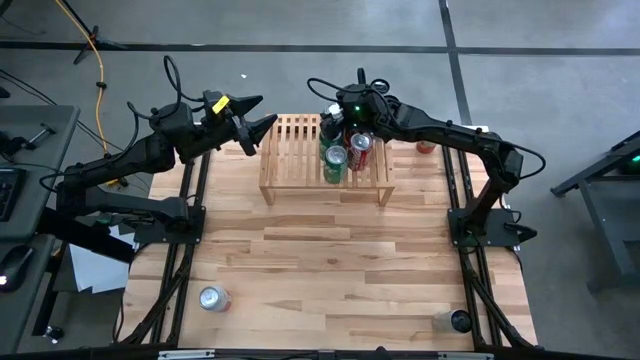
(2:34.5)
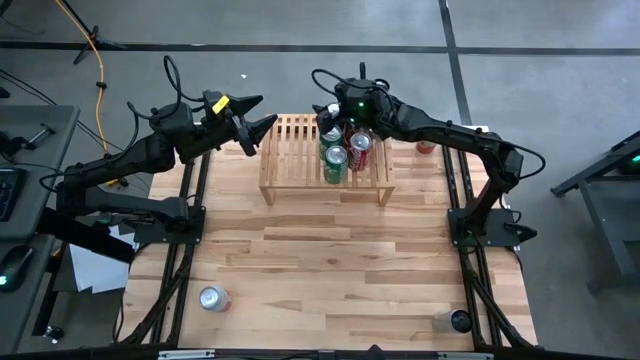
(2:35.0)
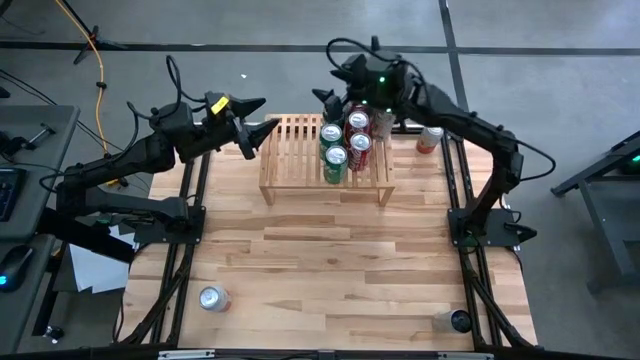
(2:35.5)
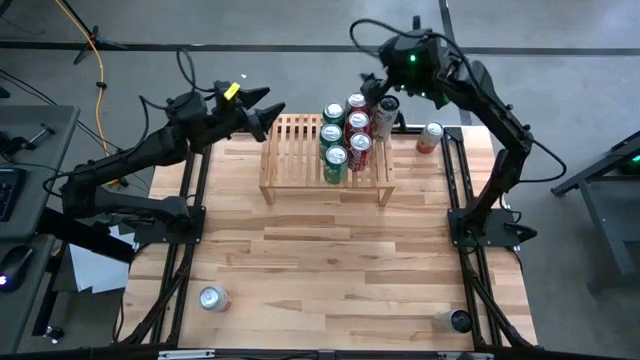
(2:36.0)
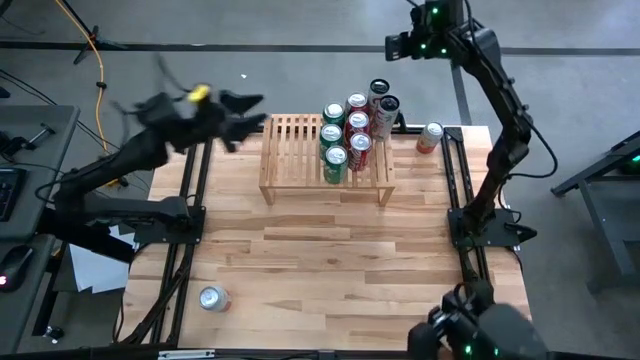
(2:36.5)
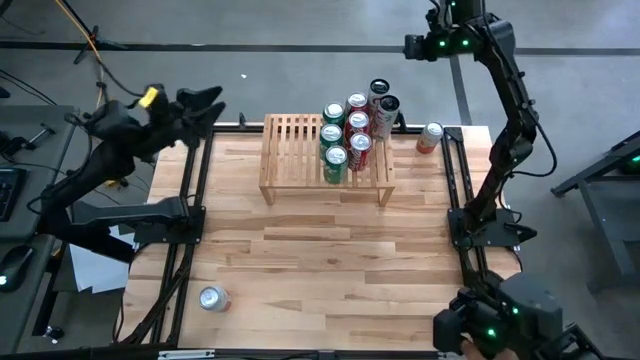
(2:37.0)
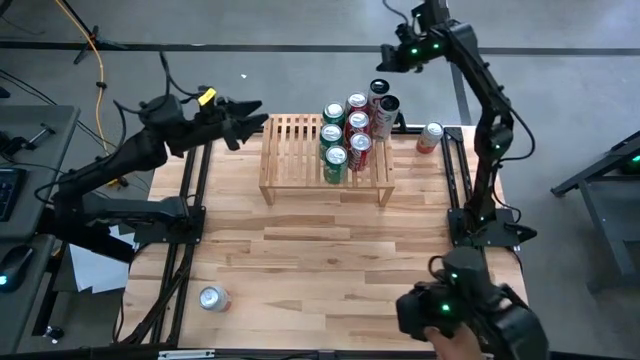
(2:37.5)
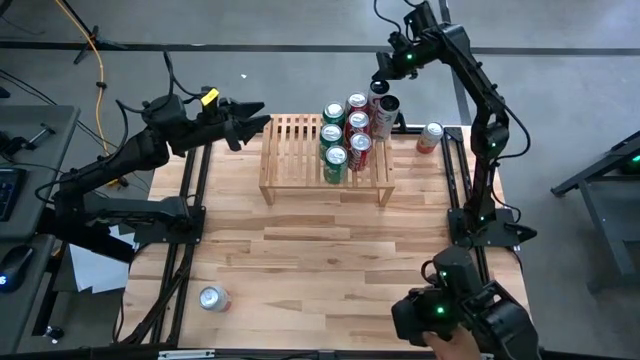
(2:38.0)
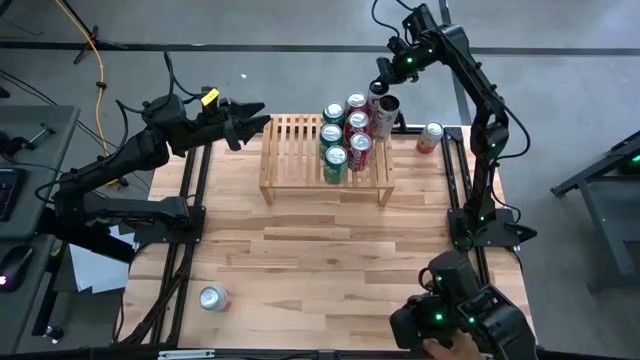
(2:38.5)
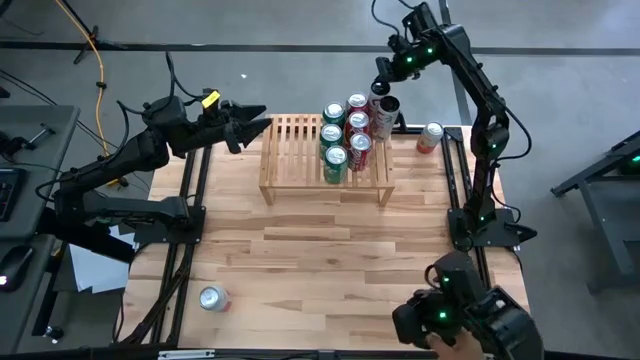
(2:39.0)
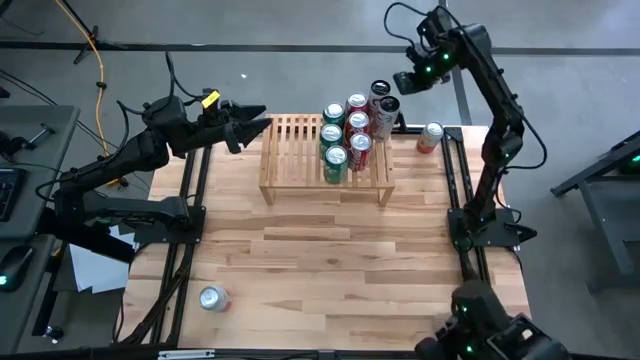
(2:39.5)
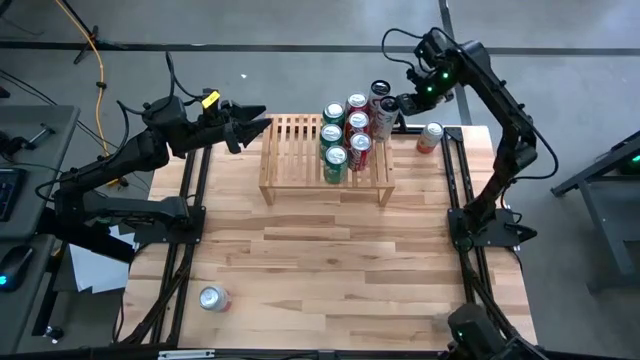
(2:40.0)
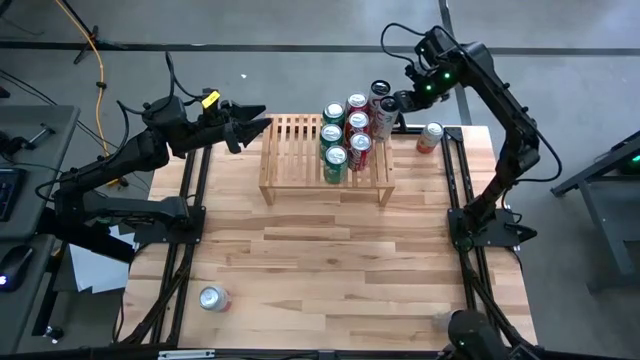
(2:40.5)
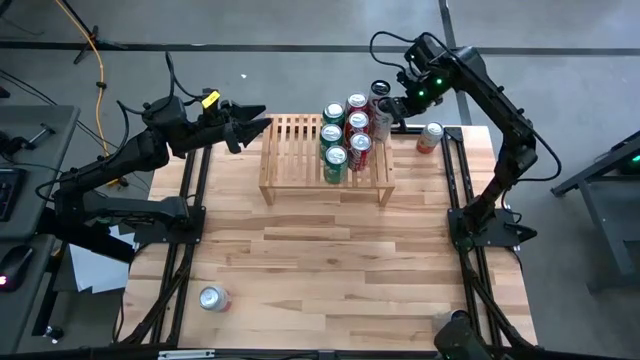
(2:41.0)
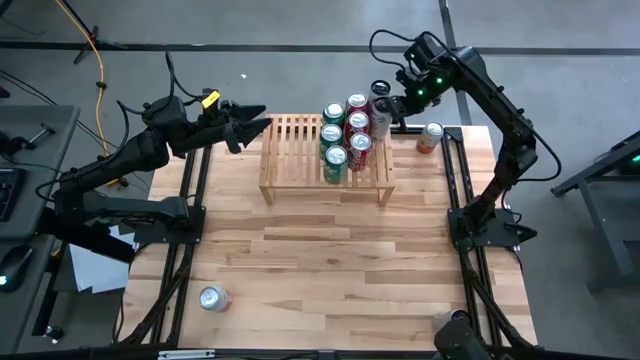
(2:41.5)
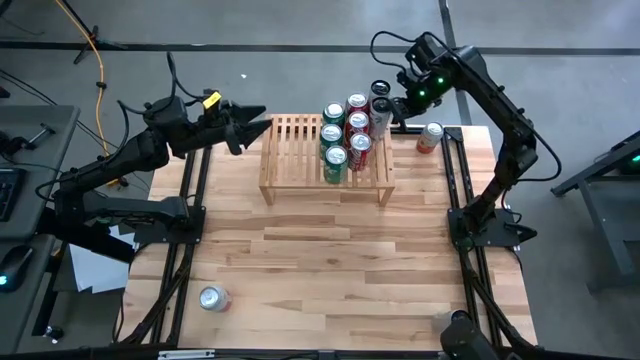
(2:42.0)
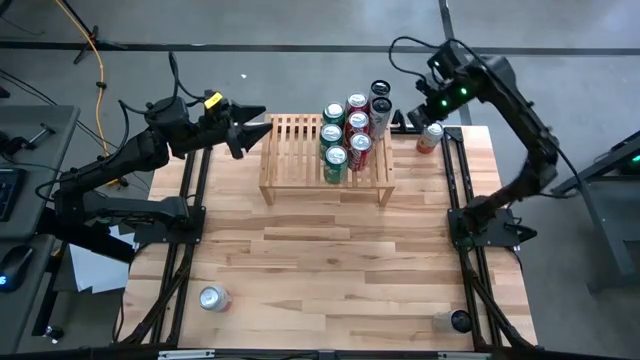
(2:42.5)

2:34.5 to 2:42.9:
Task: Place canned beverage on shelf
Adjust the white pink soda cans on the shelf

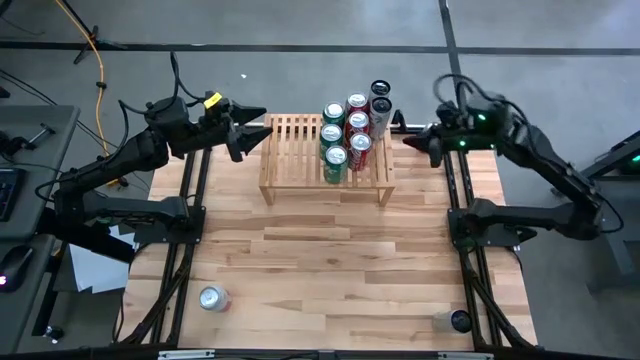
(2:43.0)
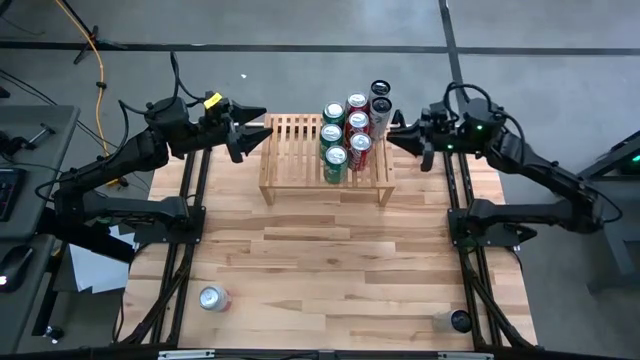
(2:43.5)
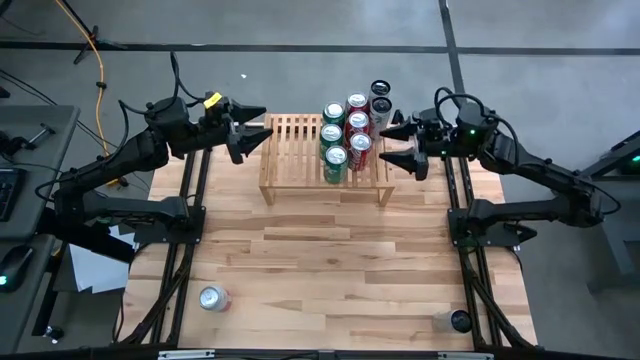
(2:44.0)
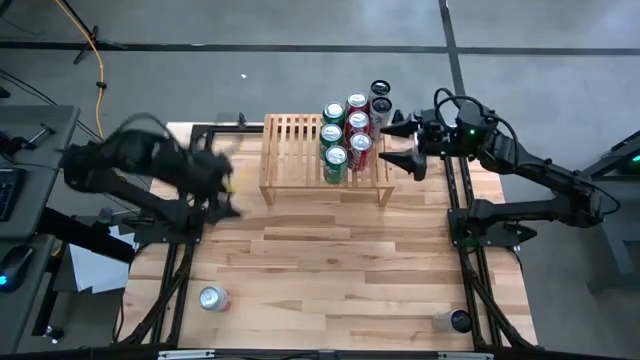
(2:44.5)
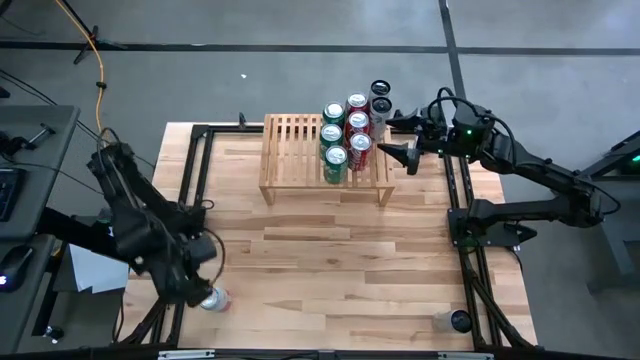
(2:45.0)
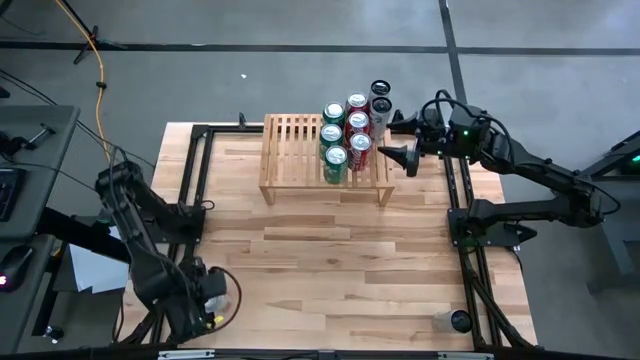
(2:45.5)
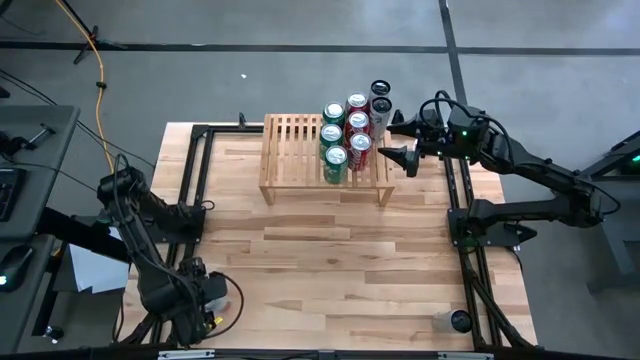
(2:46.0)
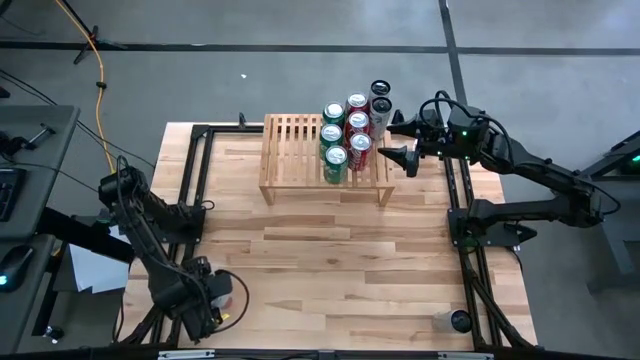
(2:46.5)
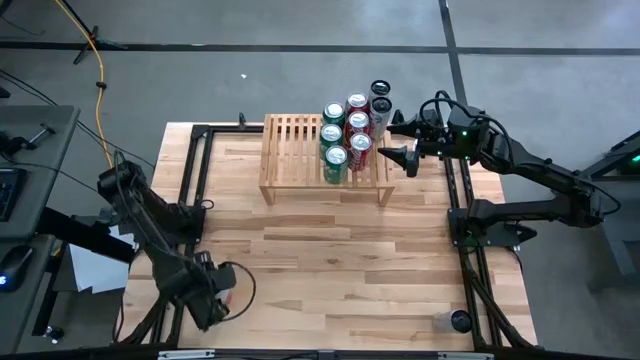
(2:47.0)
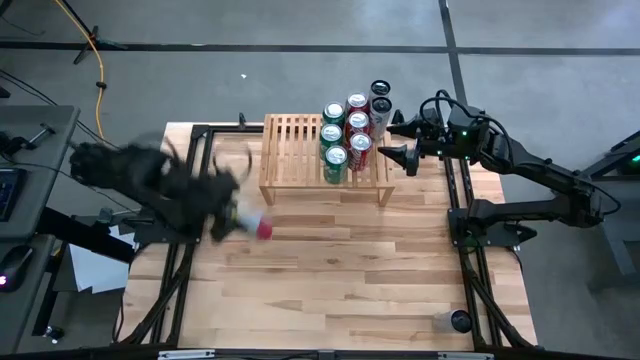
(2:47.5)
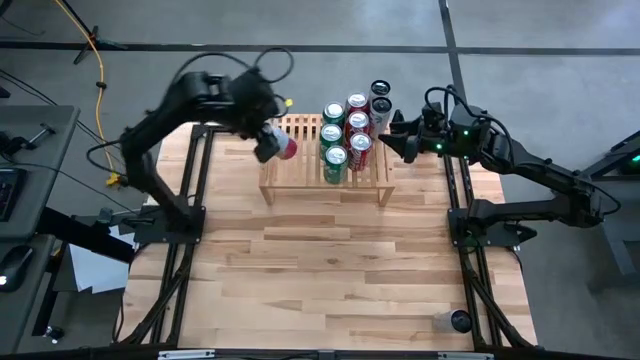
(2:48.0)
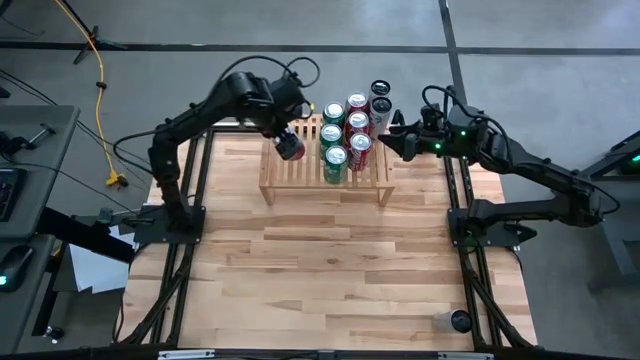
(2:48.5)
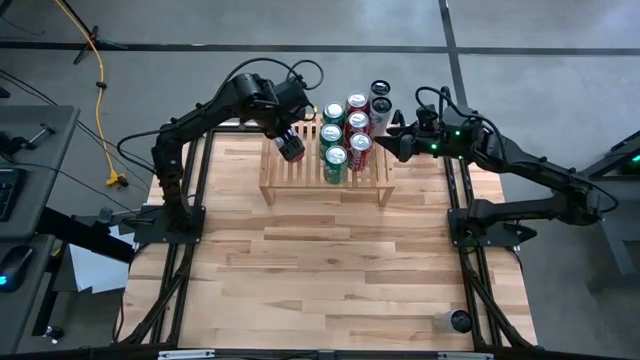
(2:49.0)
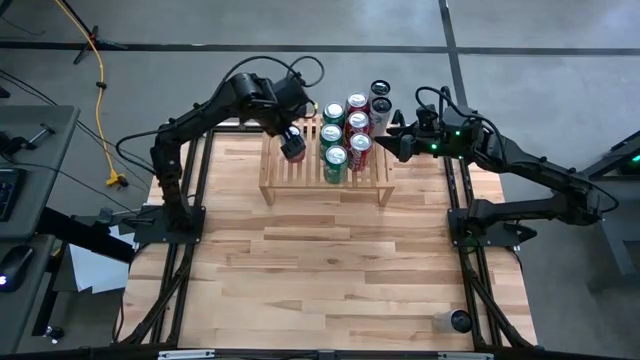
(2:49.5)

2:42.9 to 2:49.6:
Put the bottom pink soda can on the shelf

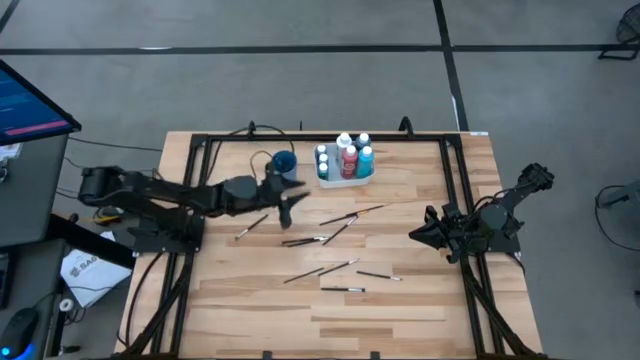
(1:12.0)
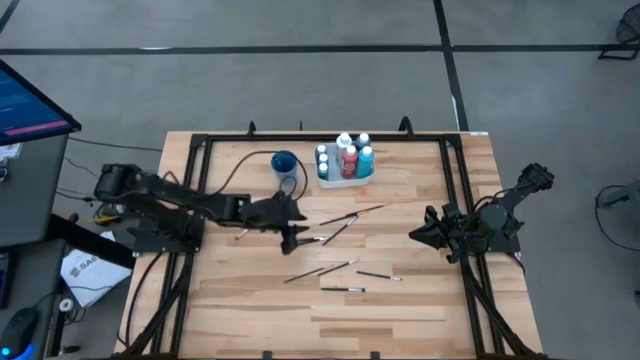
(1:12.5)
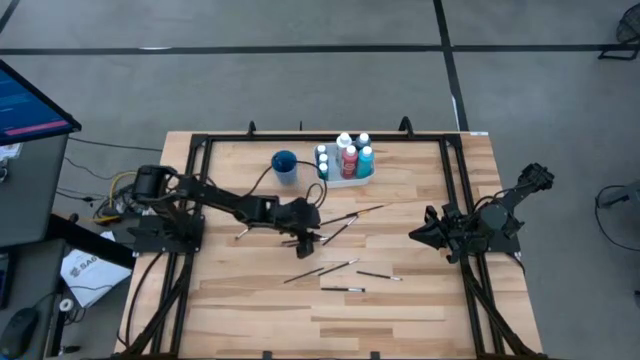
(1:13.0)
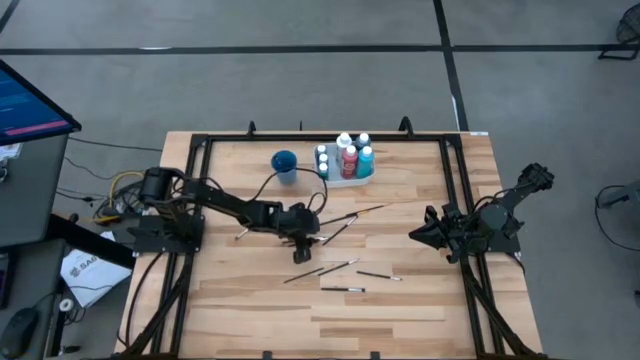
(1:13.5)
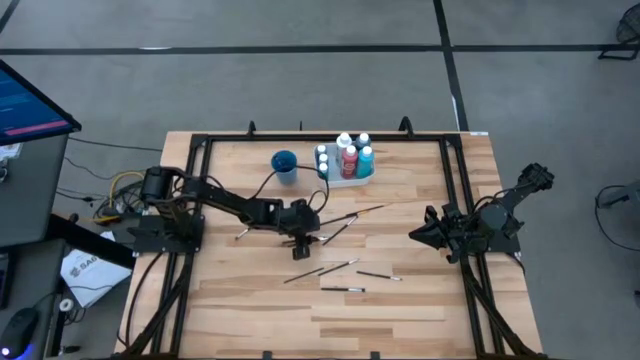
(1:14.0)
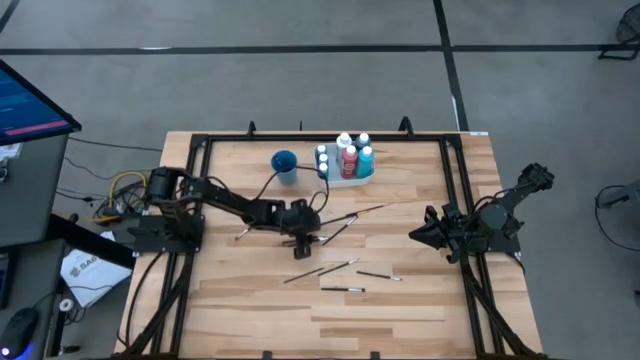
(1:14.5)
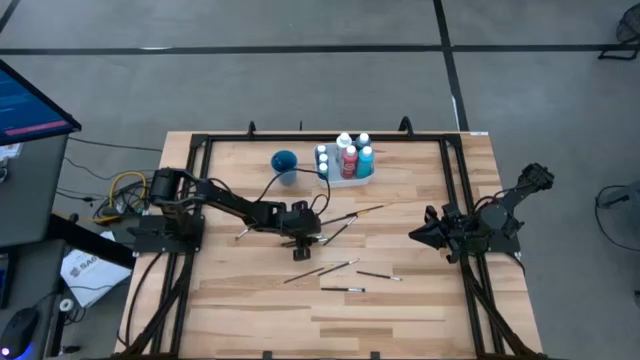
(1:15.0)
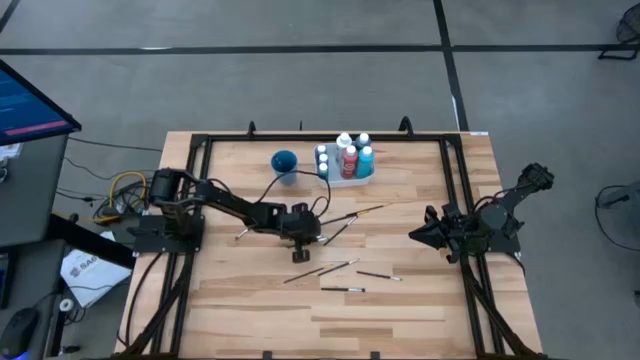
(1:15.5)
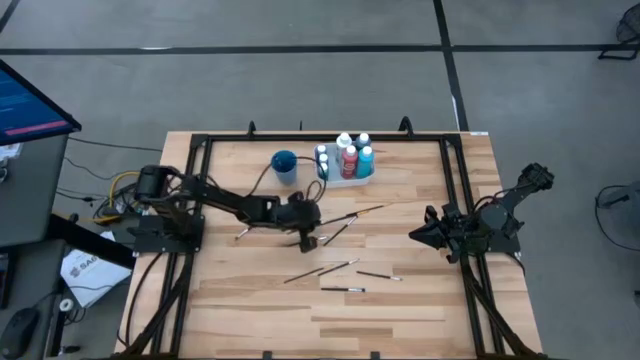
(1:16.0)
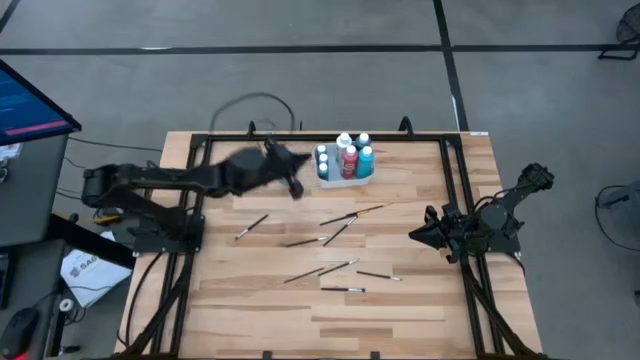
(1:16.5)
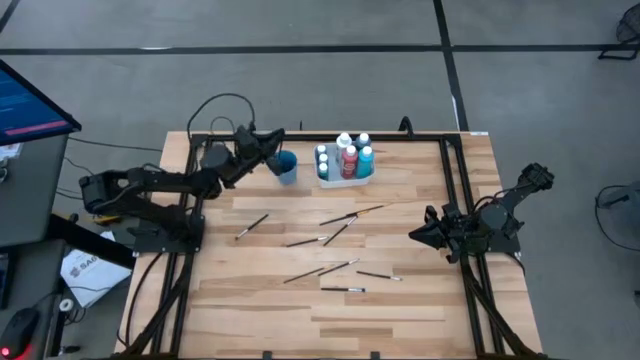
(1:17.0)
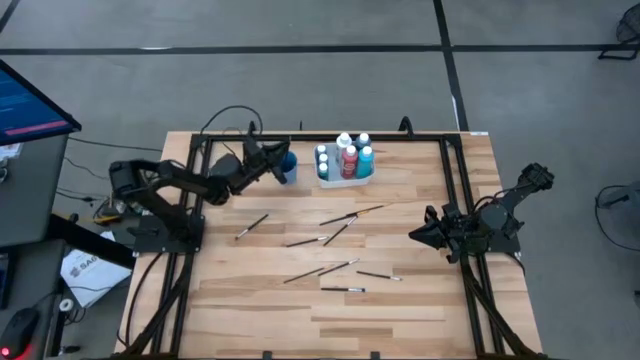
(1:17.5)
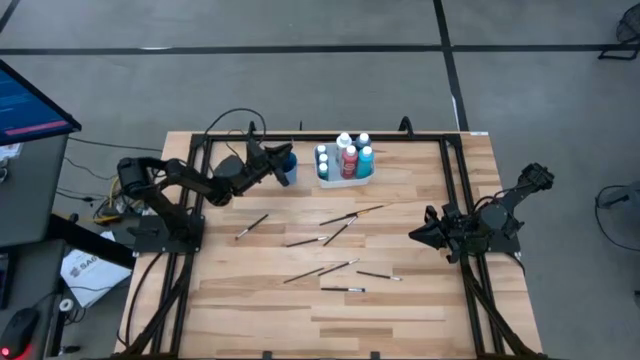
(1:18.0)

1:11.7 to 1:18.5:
Task: Pick & Place Paint Supplies
Put the silver and black paint brush into the blue cup
